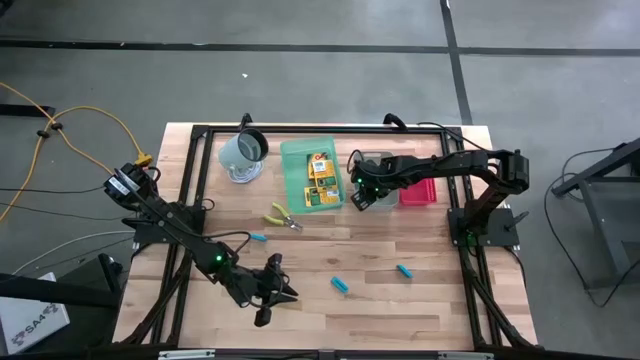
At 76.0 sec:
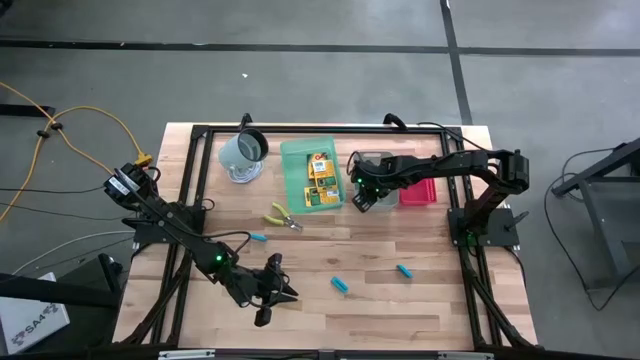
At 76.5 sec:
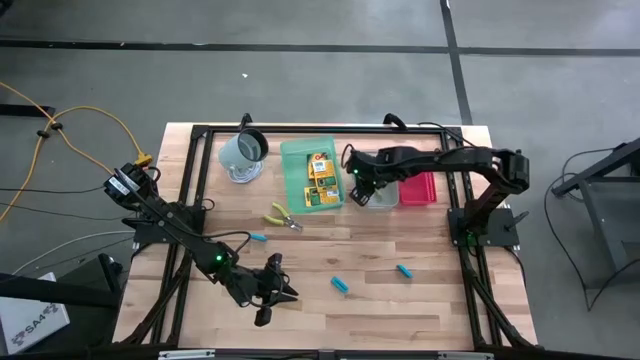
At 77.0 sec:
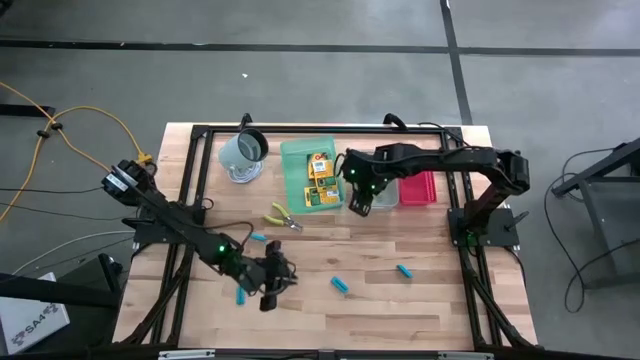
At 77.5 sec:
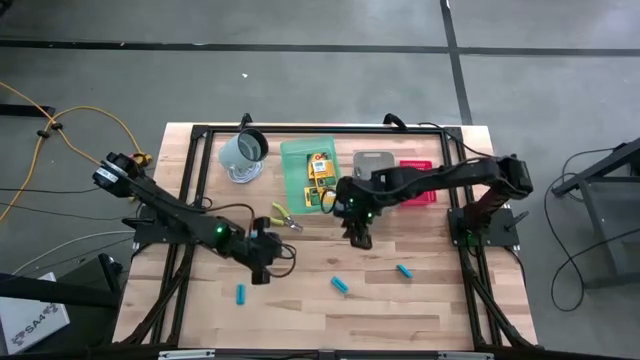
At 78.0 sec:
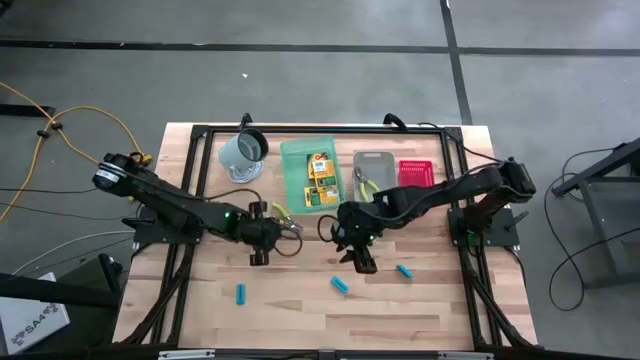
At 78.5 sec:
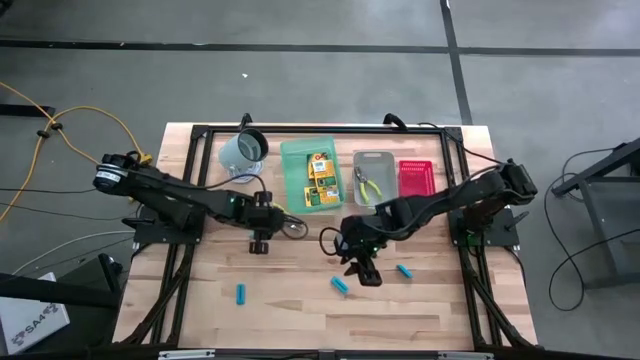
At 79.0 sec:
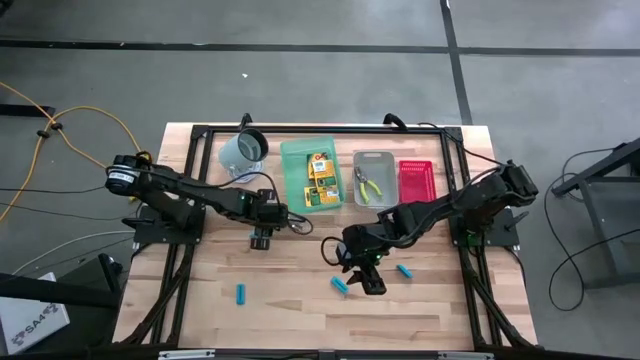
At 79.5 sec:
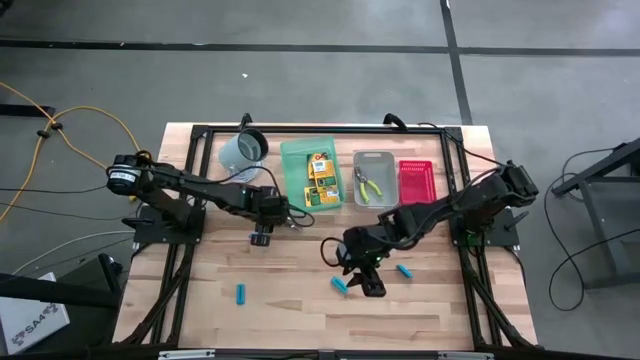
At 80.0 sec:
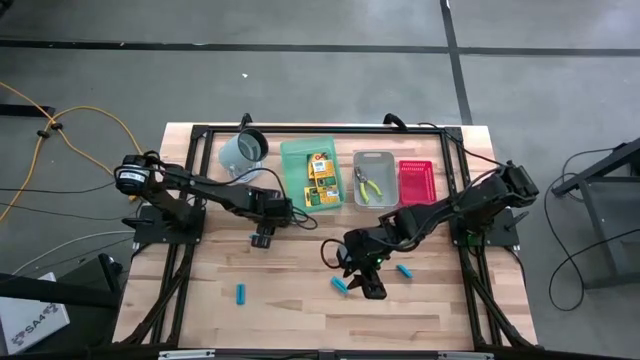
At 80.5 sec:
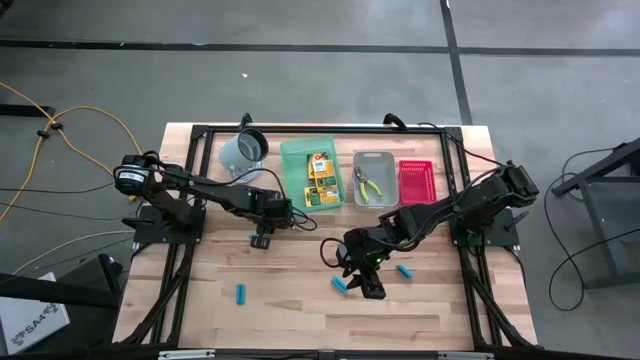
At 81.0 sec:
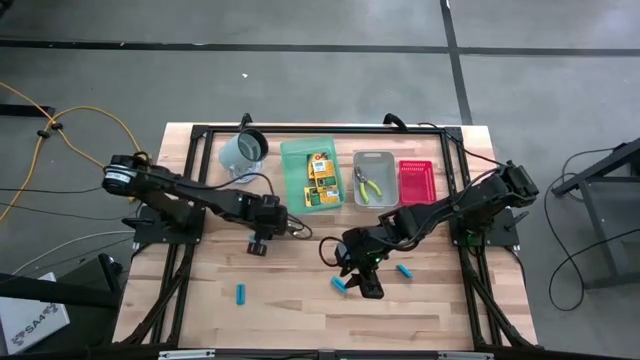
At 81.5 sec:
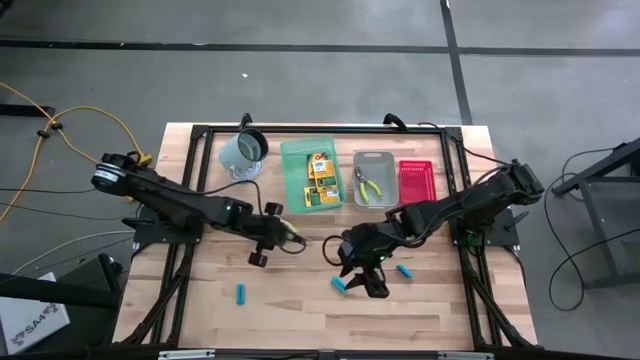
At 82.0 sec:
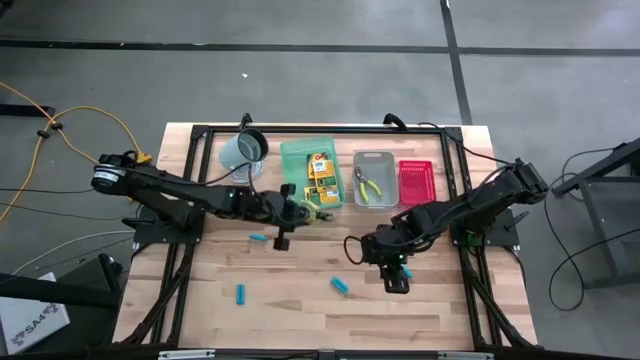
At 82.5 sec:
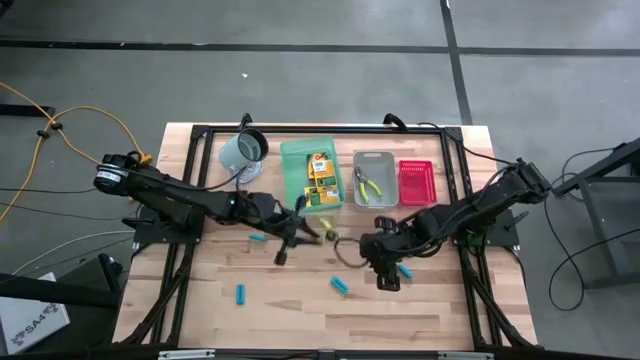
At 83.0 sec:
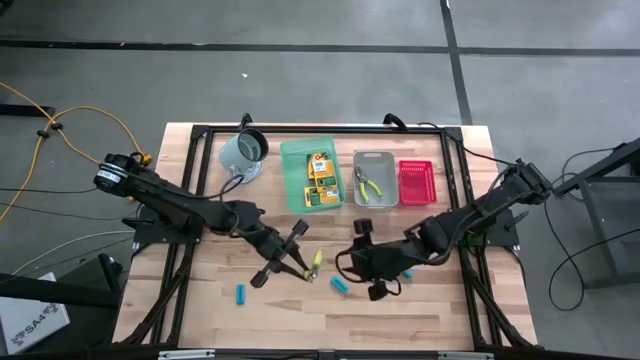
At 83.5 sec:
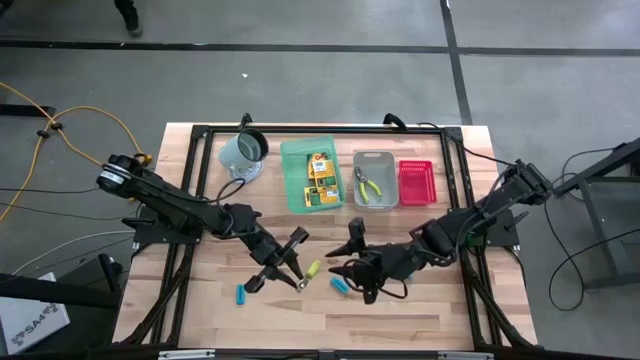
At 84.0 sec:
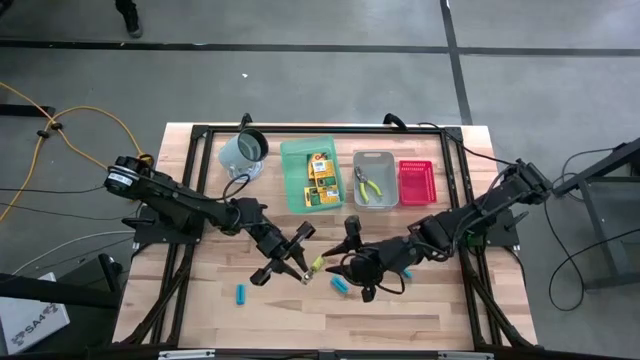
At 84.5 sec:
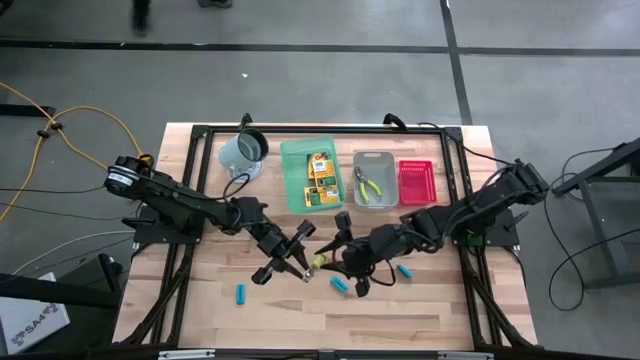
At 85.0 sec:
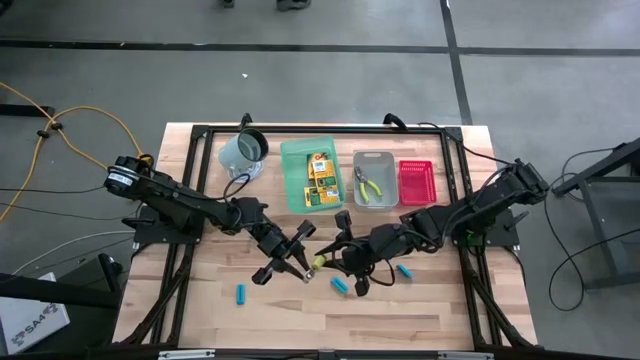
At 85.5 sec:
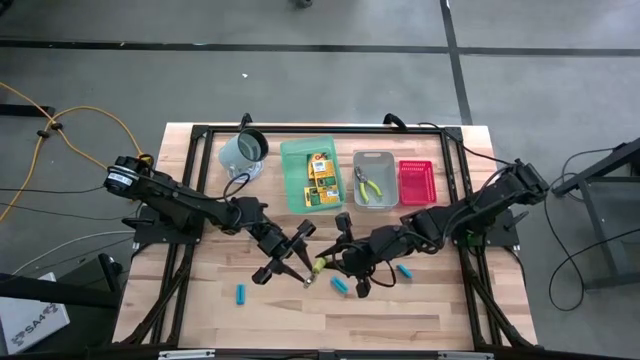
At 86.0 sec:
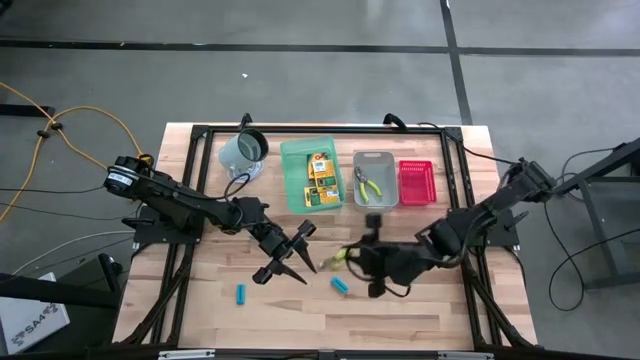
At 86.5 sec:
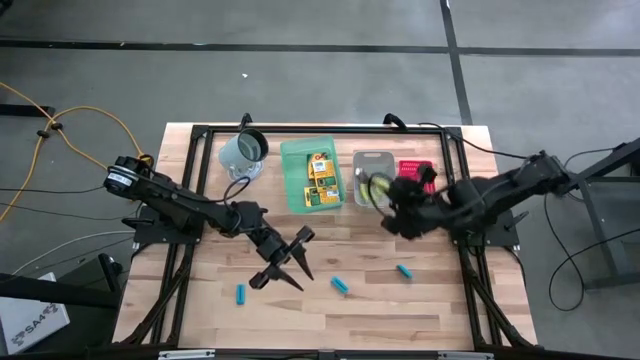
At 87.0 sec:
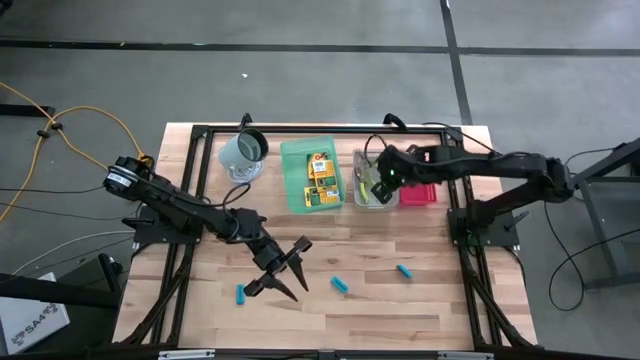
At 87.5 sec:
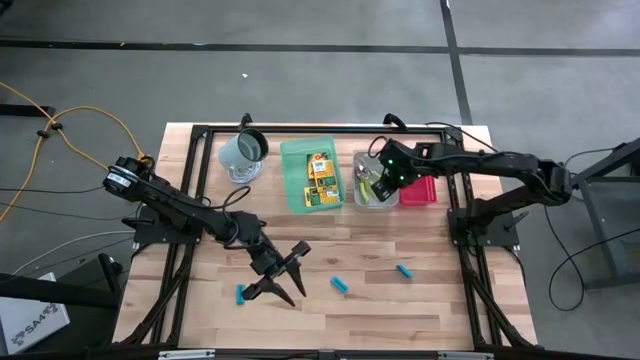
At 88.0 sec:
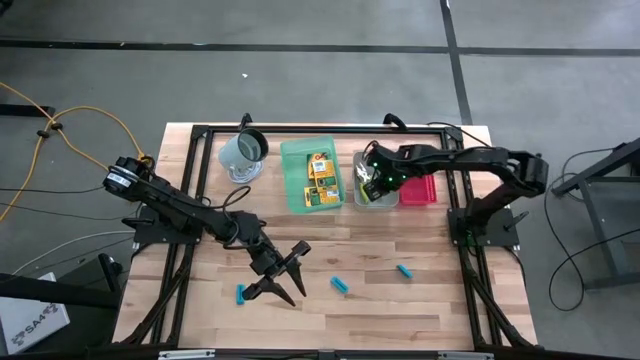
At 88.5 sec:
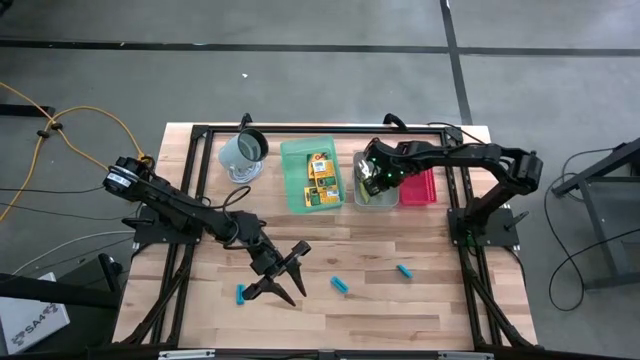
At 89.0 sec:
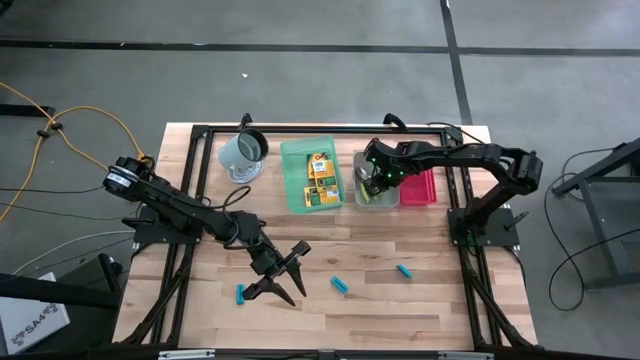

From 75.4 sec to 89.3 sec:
Task: Pick & Place School Supplies
Put the green puncher into the gray bin

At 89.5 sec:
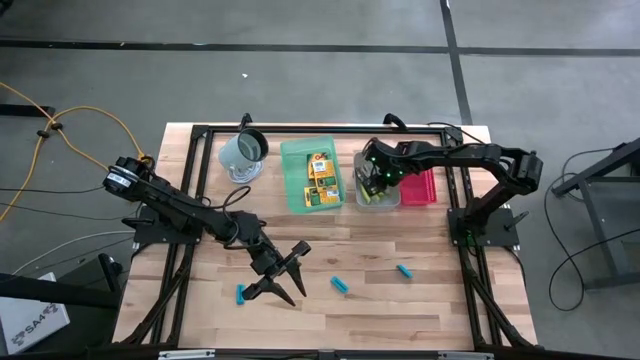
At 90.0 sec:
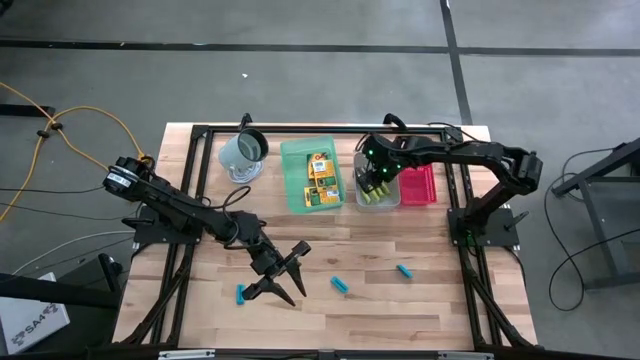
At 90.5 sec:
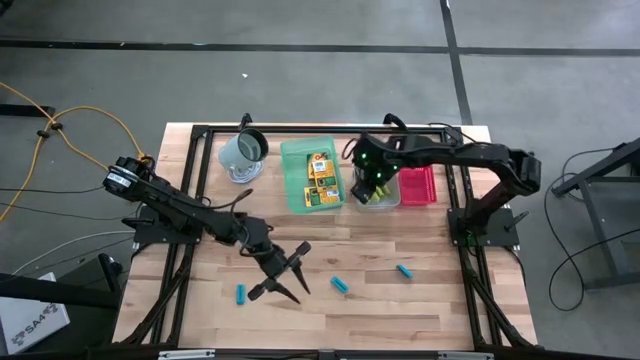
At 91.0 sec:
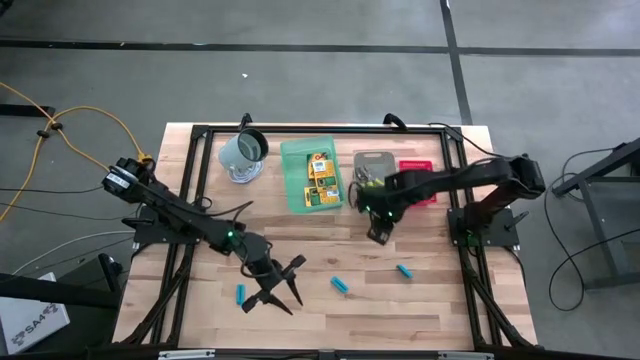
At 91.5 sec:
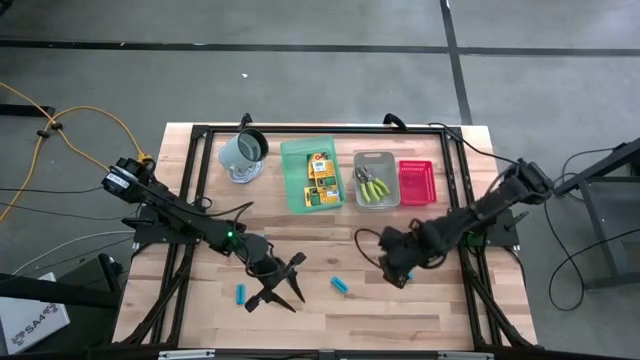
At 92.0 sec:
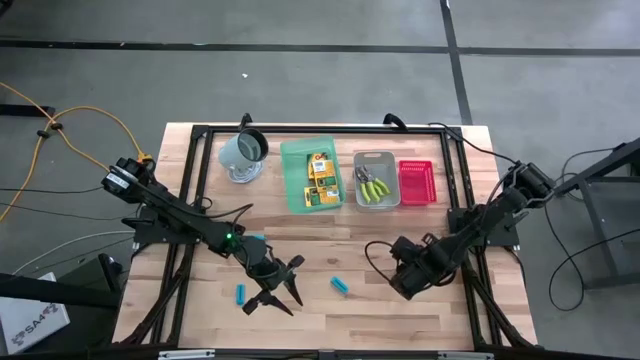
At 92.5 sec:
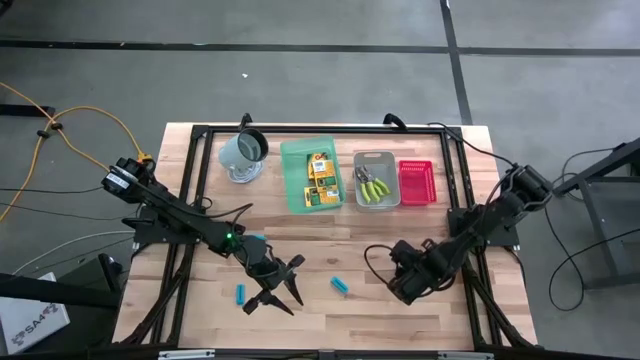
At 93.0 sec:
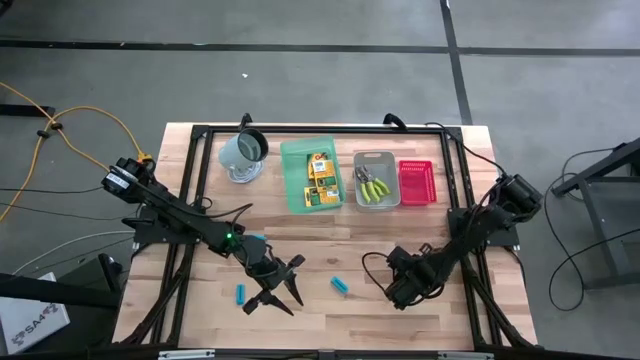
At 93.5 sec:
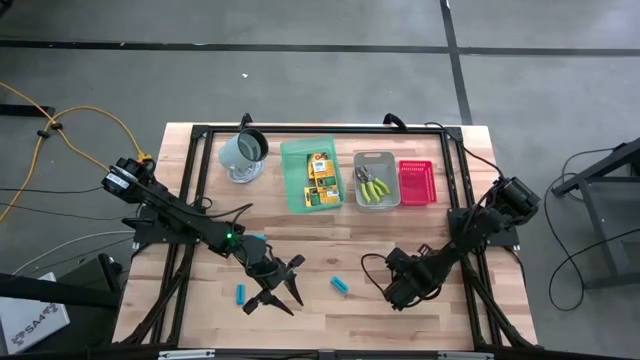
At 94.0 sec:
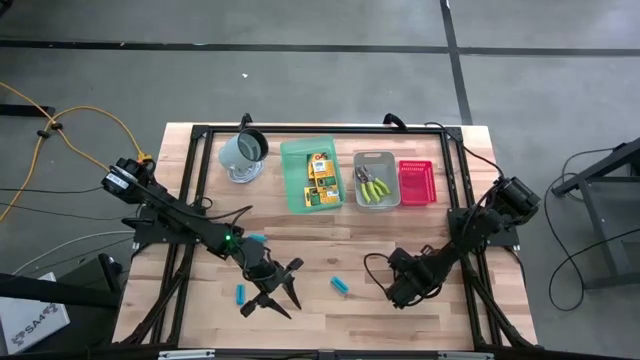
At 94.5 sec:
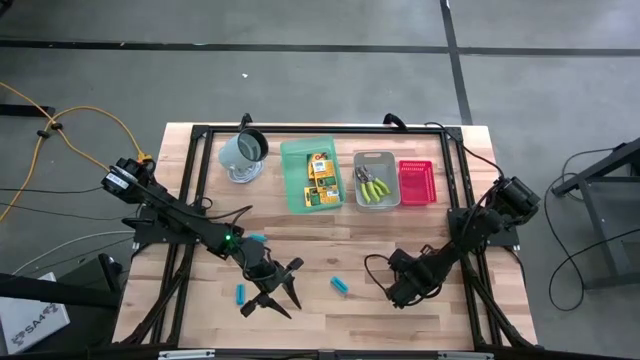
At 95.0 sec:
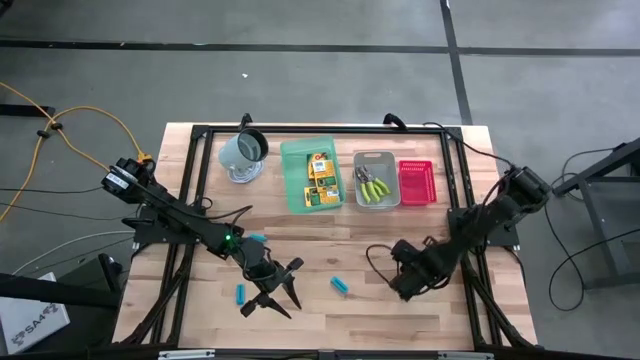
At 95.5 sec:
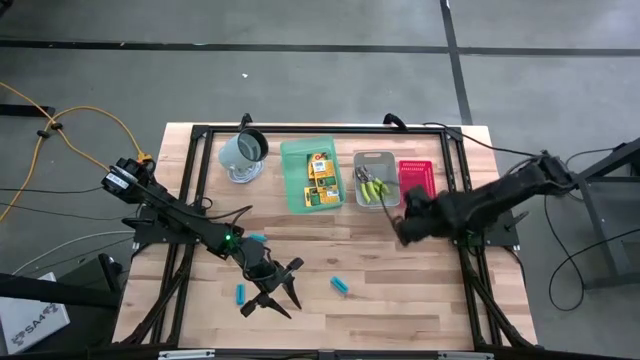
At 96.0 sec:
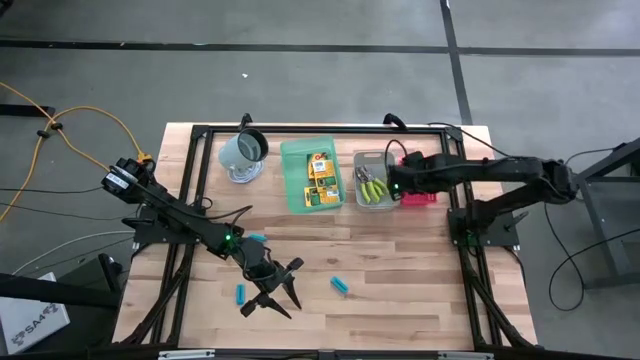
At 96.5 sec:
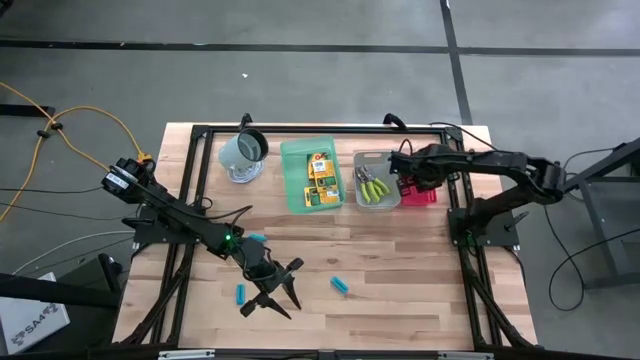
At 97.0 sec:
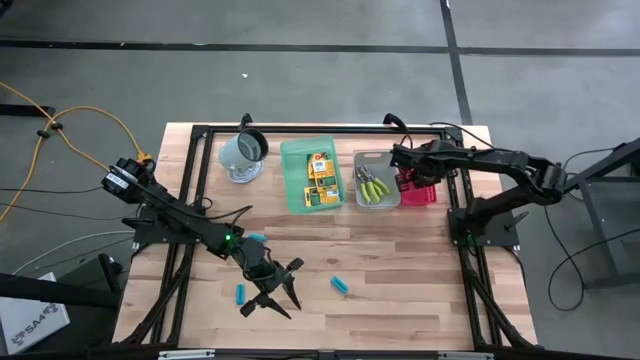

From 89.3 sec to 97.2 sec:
Put the middle right blue eraser into the red bin
